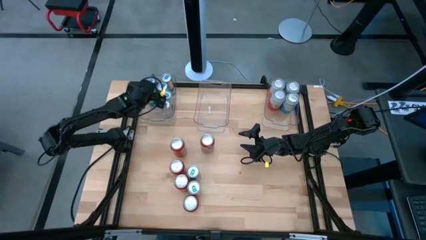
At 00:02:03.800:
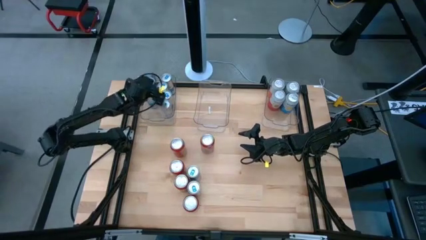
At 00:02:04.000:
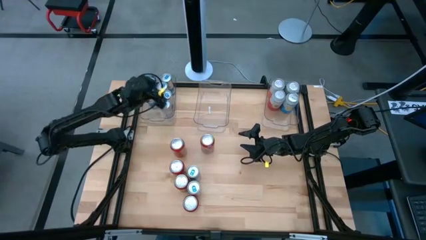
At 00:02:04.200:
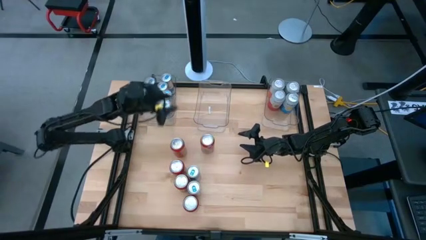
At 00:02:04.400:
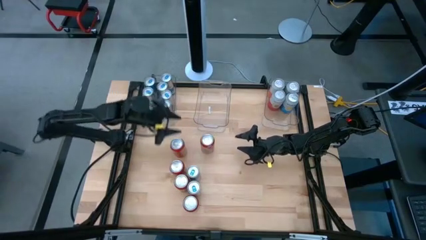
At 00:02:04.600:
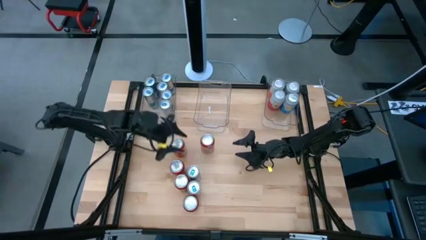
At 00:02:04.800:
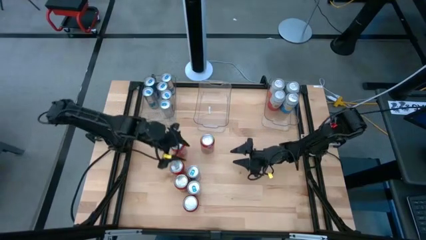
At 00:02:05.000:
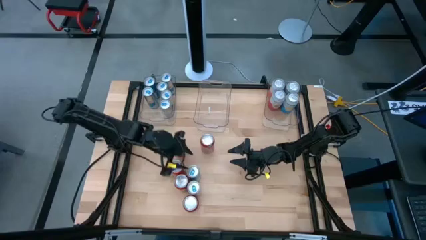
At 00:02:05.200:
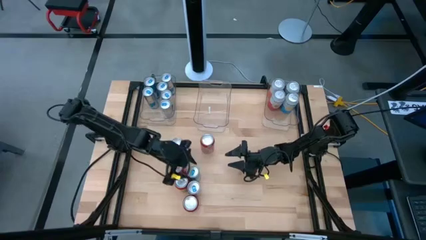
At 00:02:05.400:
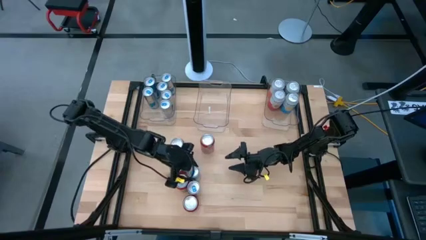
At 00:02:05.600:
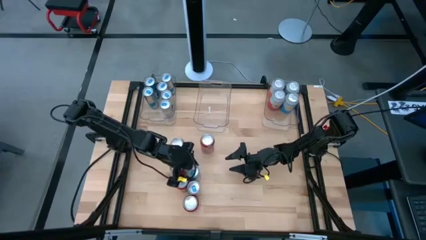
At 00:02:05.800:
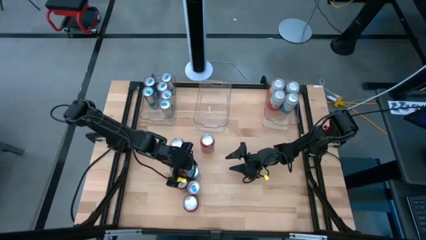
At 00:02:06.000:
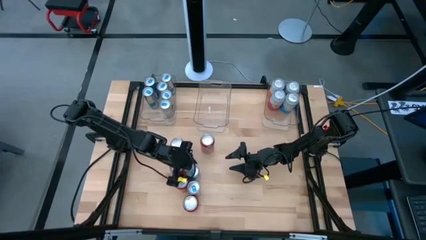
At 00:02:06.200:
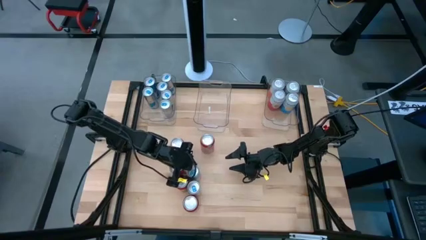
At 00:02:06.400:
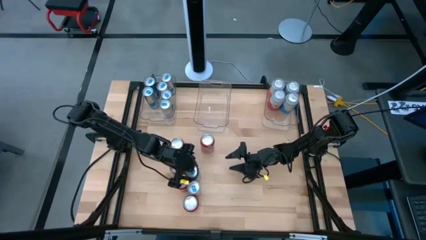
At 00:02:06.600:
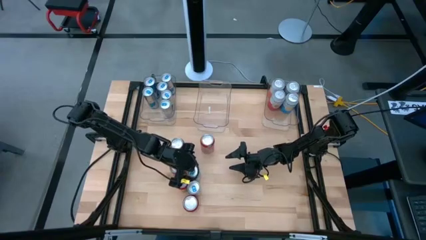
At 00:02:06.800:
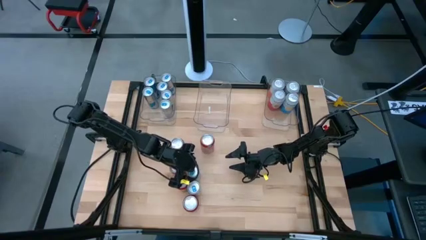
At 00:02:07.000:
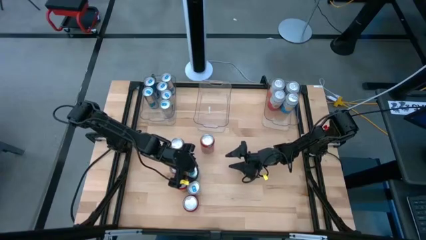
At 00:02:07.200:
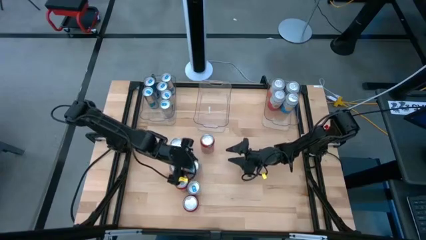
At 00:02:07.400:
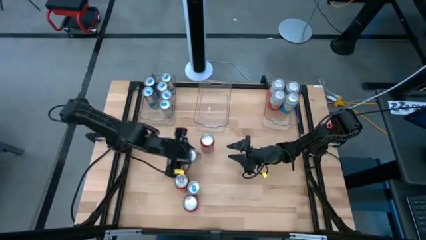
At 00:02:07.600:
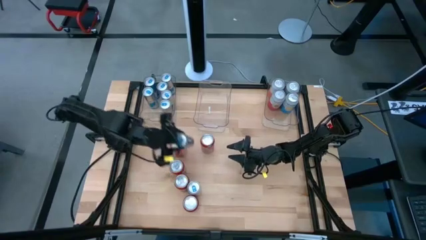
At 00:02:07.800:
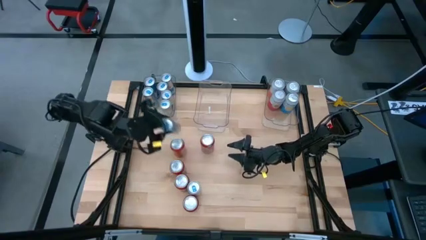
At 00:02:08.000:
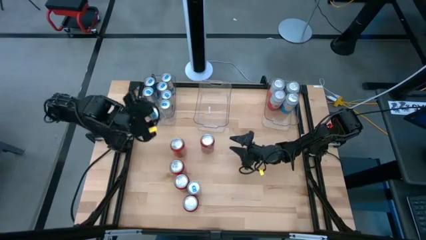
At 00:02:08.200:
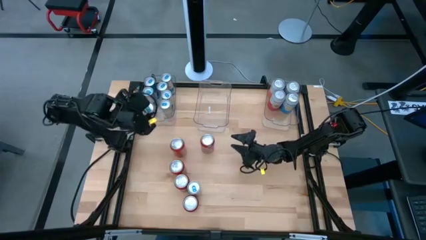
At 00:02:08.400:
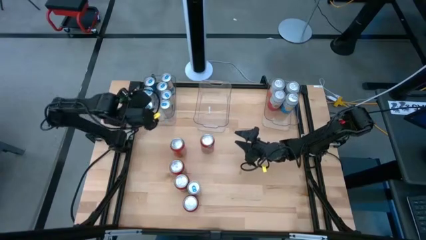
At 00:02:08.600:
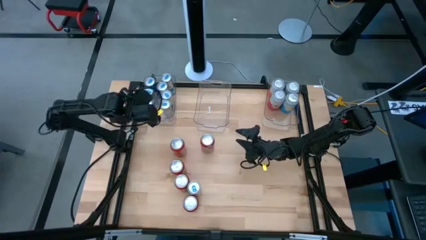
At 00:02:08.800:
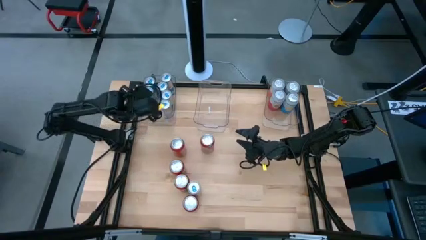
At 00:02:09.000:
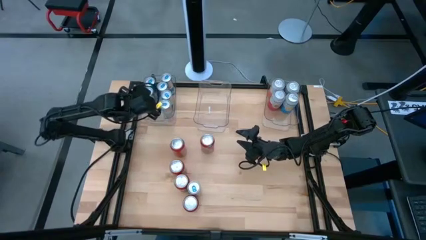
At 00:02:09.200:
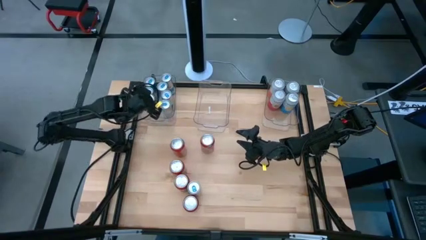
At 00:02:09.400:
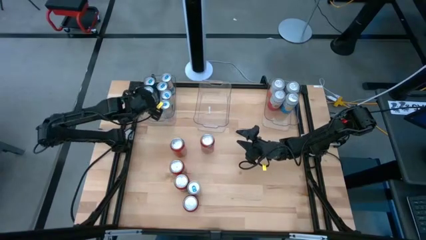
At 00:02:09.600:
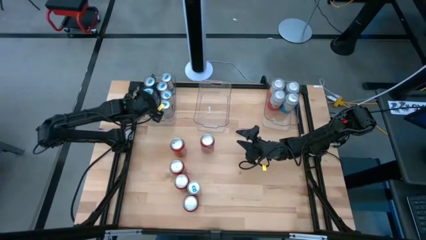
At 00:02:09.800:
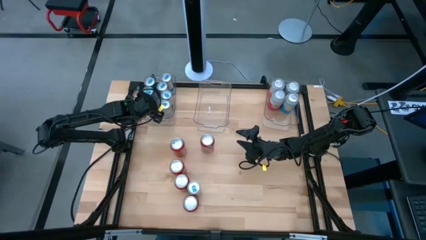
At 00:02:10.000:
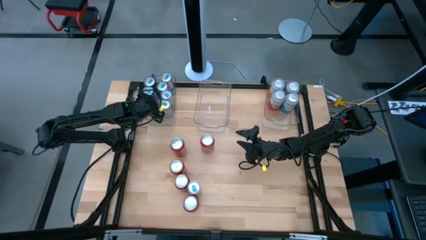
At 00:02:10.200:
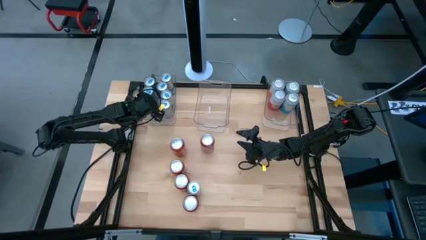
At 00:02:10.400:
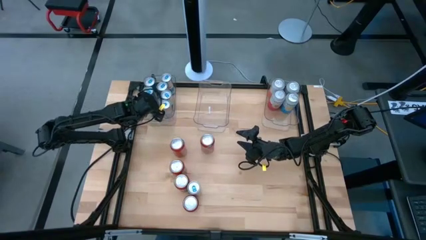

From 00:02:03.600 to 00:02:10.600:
Task: Sort soda cans
Put the blue soda can into the left transparent bin

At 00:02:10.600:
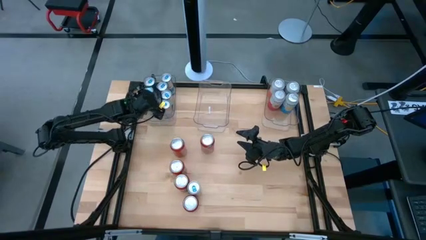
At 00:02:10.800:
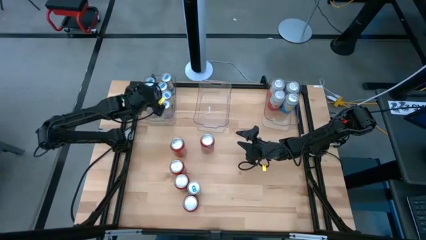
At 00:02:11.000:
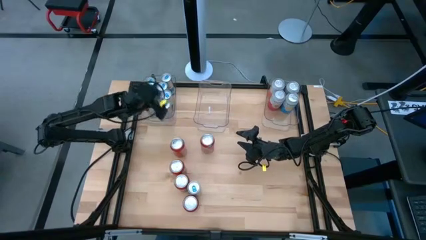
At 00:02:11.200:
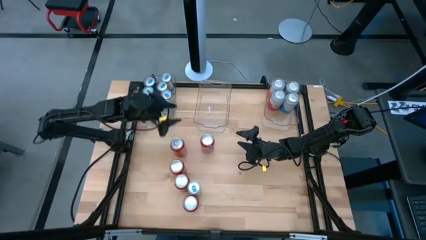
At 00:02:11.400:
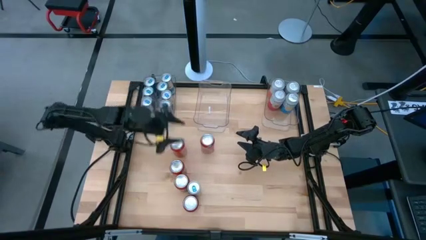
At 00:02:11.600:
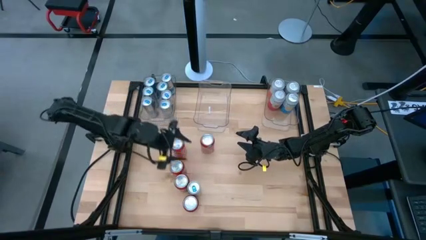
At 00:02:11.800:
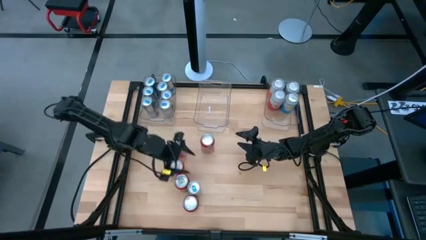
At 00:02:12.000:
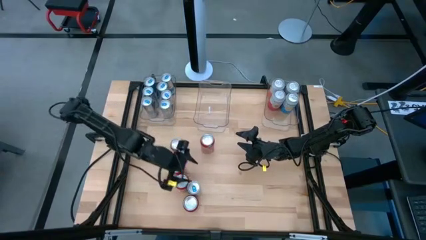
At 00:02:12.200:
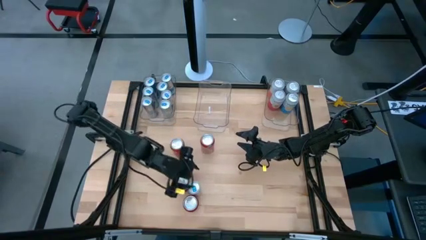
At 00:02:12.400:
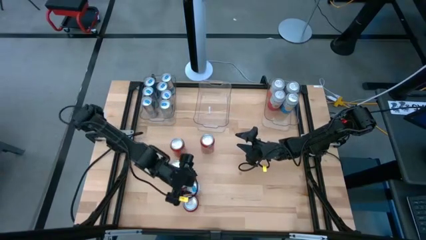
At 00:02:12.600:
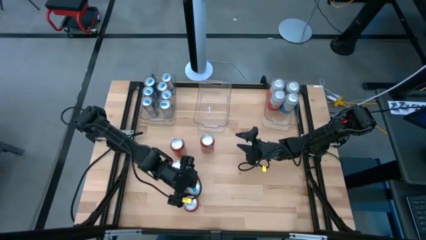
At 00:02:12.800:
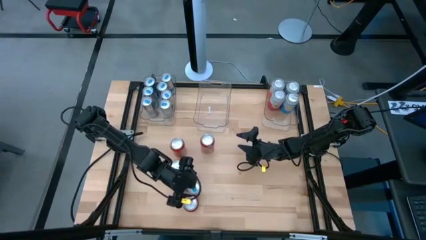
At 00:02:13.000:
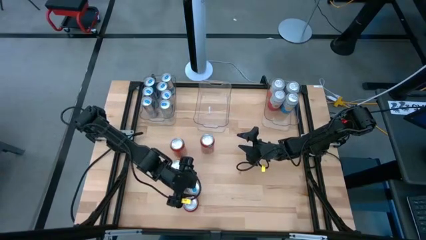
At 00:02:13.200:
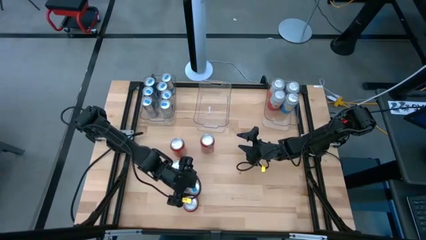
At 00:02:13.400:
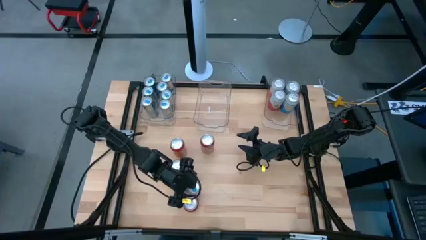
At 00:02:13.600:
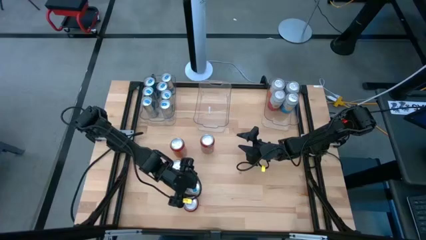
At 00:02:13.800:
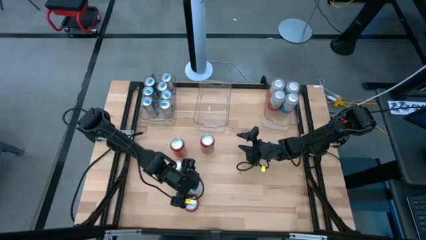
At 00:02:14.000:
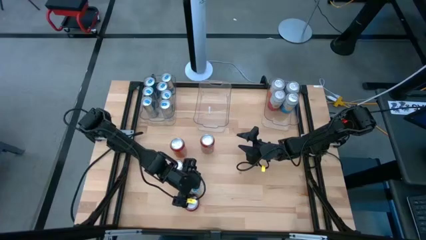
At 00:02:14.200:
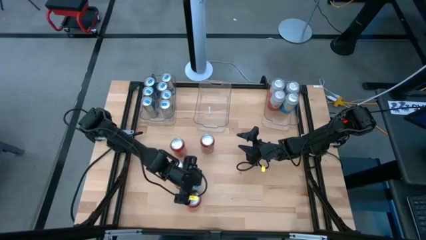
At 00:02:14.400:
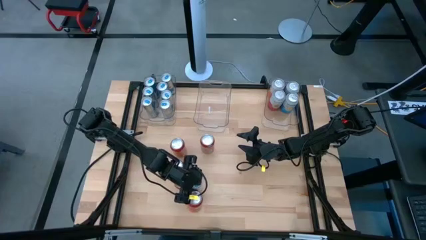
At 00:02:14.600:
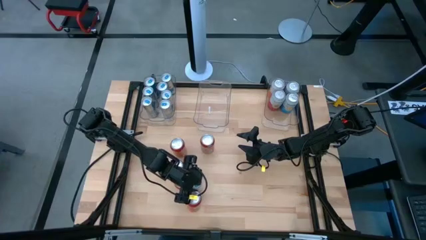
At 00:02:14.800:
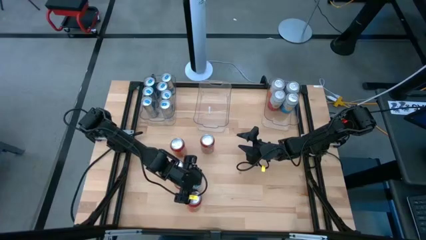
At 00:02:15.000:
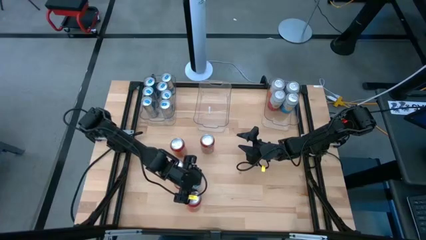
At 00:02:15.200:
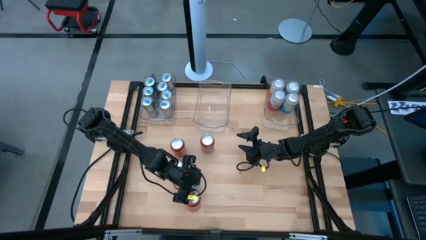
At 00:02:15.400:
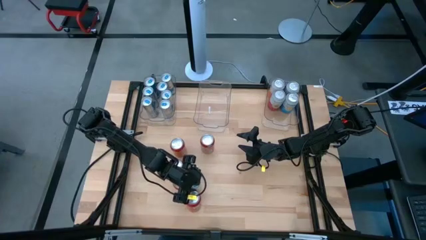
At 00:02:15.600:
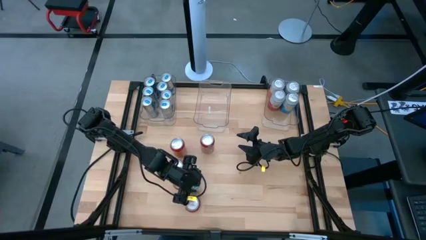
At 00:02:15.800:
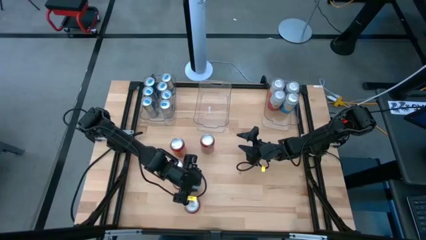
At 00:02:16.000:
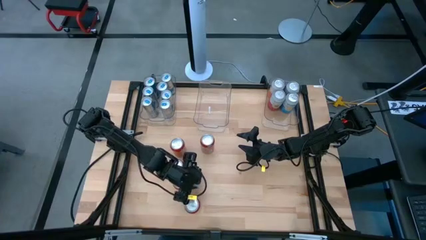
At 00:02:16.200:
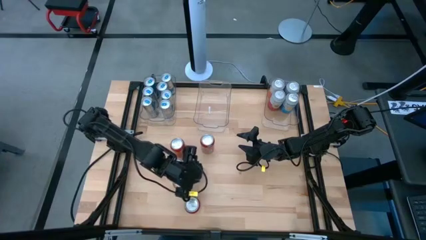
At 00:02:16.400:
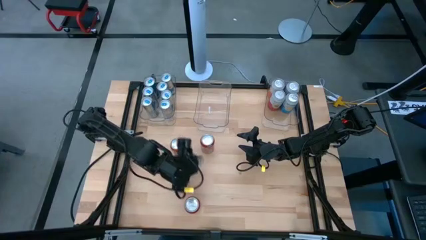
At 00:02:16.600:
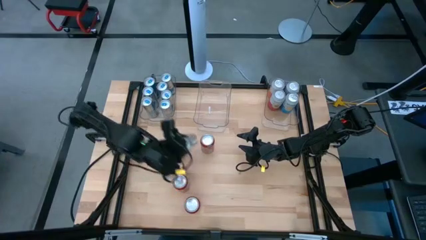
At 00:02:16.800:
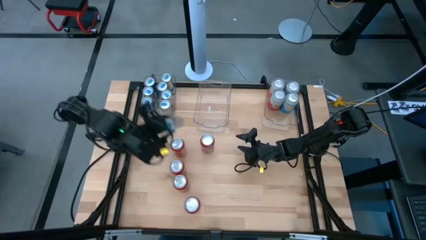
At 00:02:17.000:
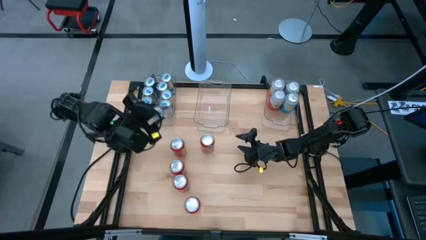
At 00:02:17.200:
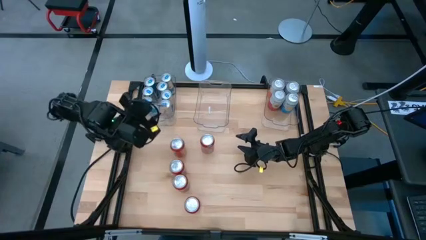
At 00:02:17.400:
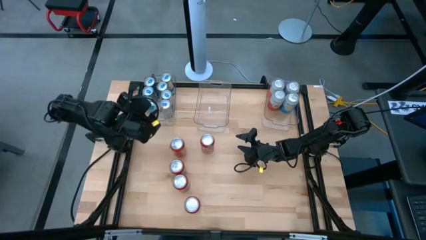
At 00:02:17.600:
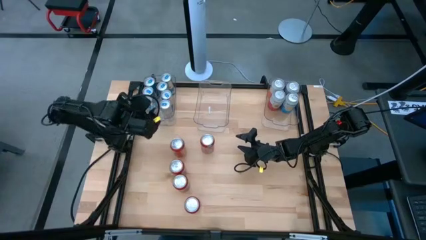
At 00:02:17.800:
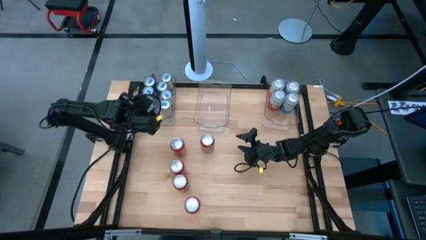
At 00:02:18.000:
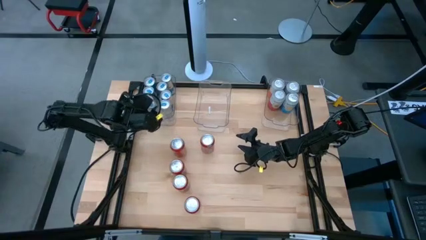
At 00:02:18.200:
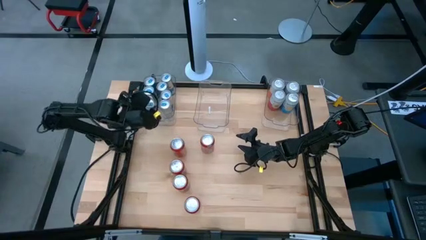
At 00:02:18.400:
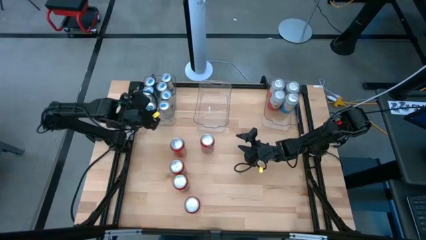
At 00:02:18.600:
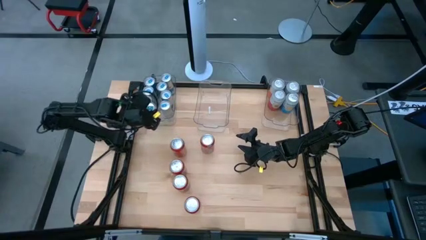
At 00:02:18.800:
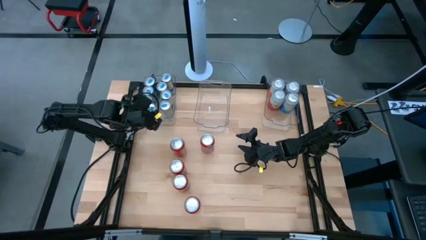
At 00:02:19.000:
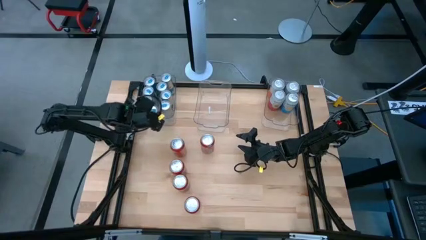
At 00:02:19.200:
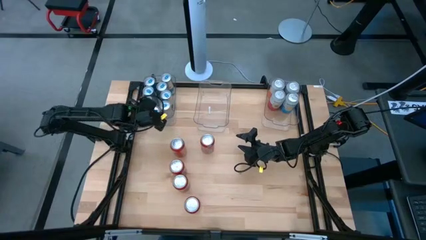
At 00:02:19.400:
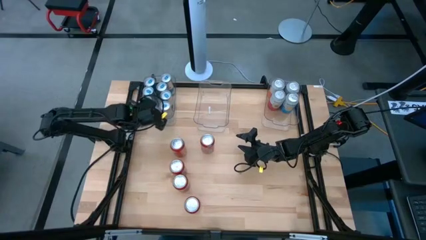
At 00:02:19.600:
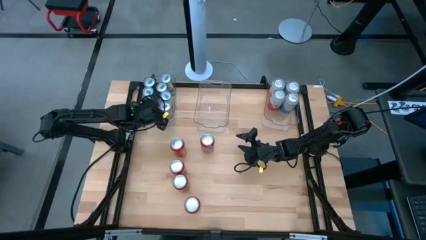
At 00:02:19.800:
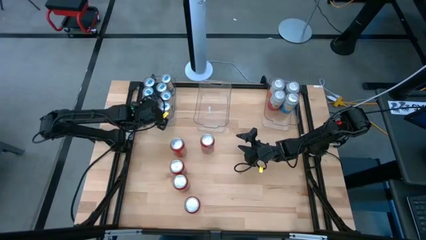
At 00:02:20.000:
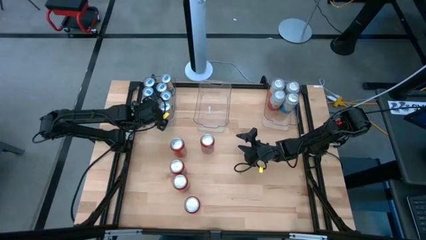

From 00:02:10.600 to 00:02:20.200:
Put the blue soda can into the left transparent bin
